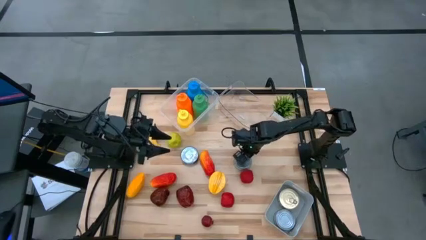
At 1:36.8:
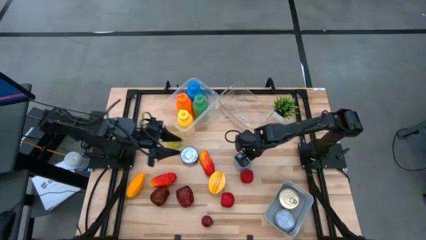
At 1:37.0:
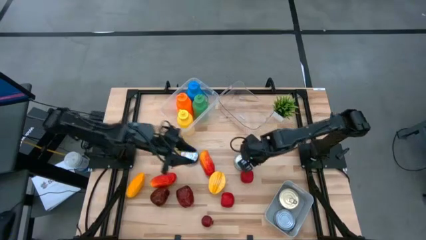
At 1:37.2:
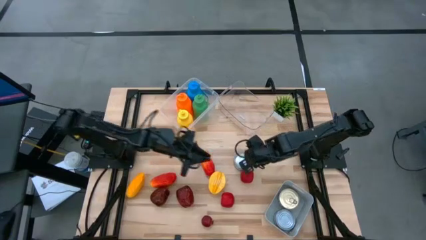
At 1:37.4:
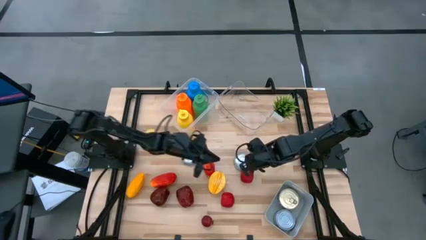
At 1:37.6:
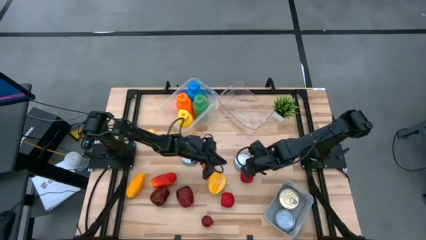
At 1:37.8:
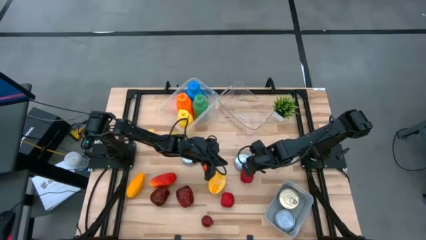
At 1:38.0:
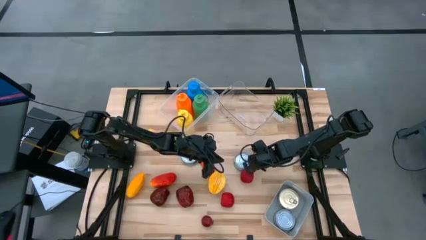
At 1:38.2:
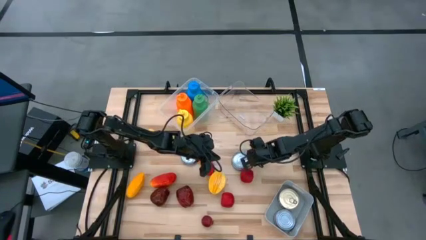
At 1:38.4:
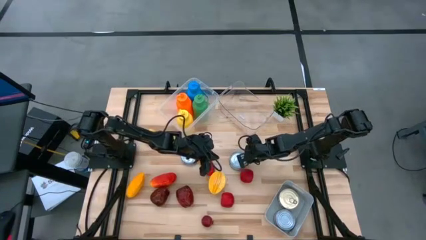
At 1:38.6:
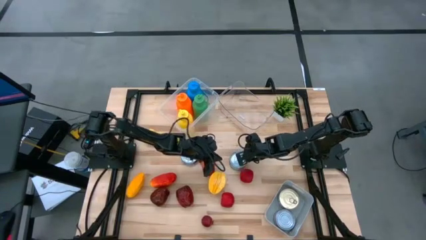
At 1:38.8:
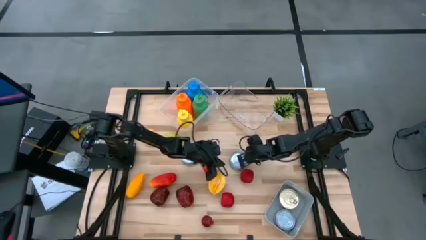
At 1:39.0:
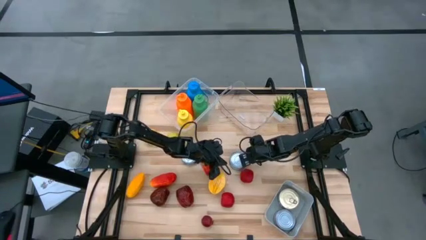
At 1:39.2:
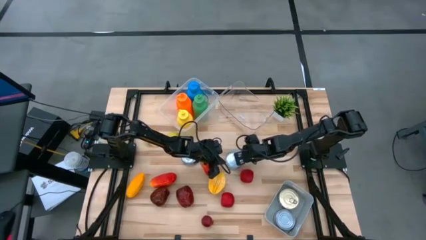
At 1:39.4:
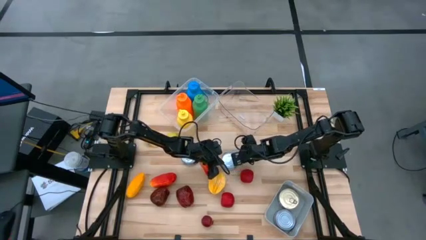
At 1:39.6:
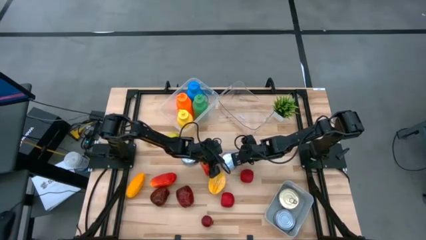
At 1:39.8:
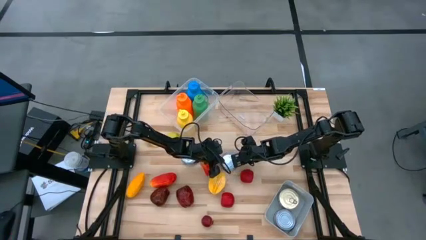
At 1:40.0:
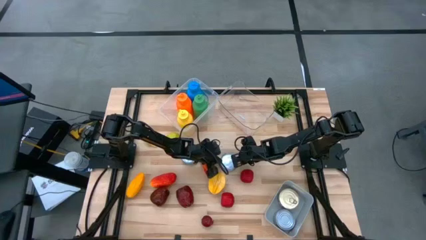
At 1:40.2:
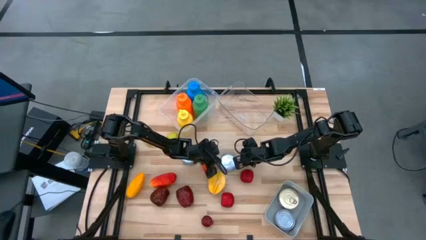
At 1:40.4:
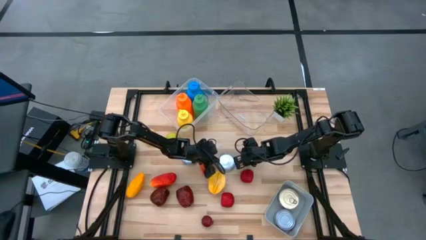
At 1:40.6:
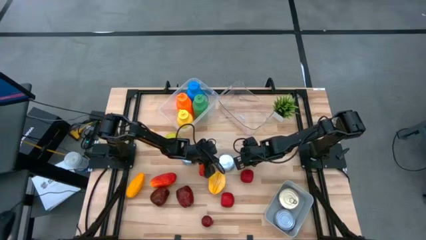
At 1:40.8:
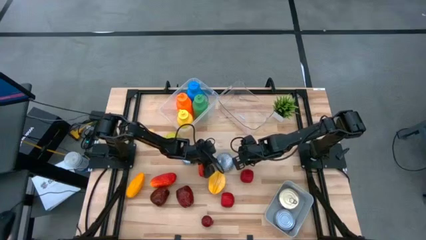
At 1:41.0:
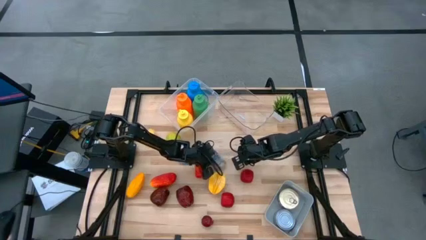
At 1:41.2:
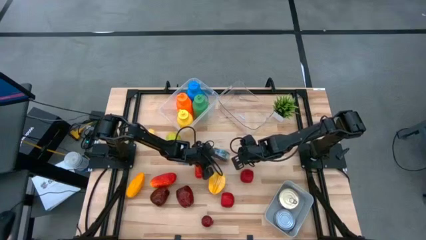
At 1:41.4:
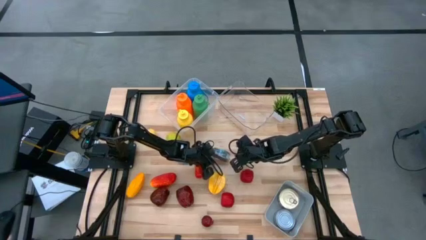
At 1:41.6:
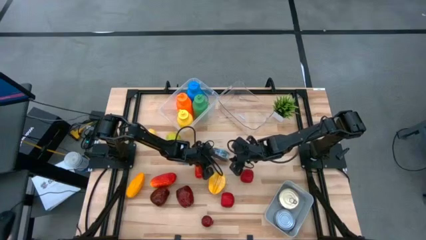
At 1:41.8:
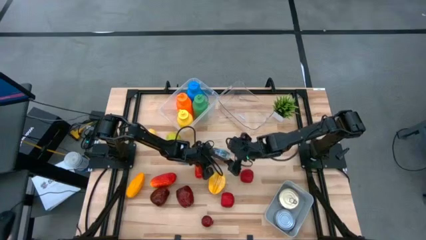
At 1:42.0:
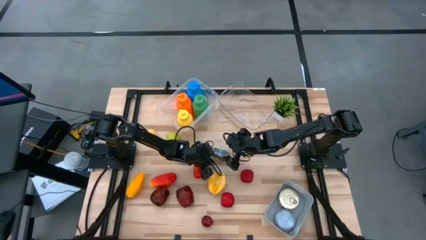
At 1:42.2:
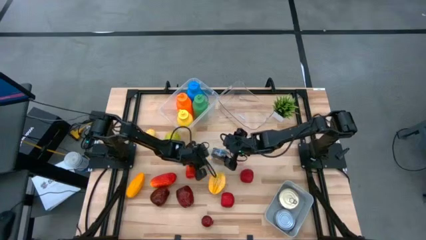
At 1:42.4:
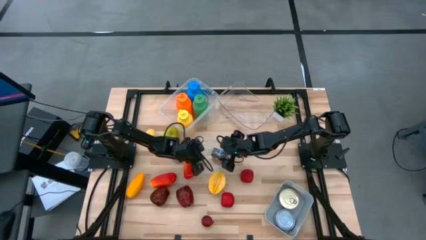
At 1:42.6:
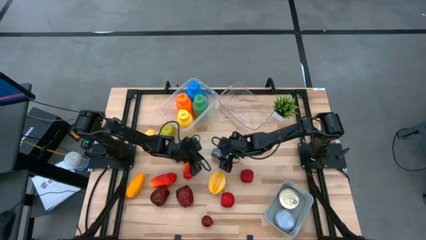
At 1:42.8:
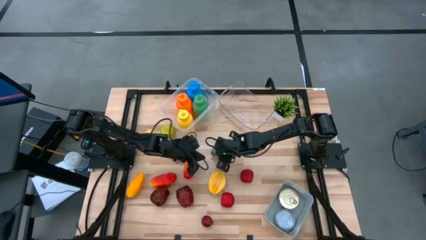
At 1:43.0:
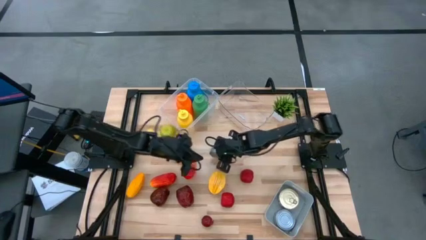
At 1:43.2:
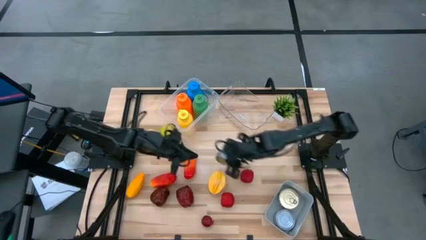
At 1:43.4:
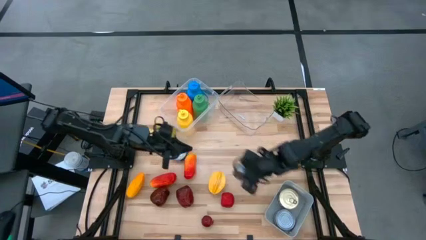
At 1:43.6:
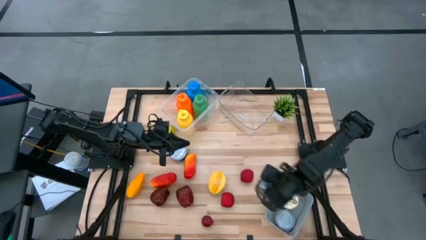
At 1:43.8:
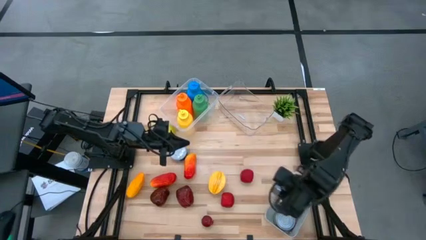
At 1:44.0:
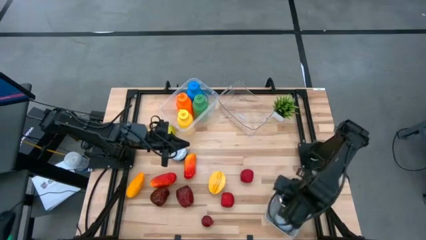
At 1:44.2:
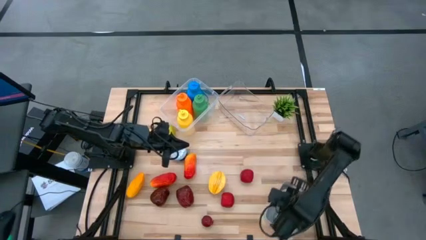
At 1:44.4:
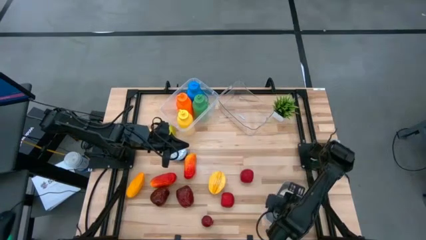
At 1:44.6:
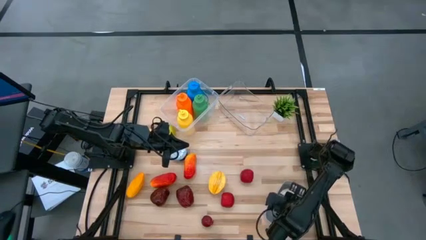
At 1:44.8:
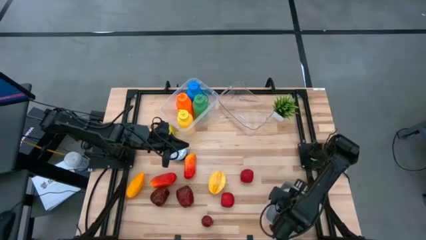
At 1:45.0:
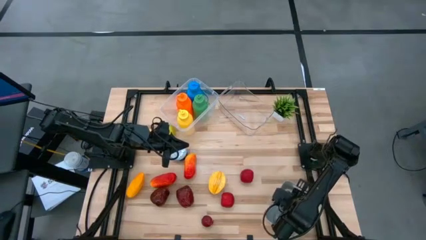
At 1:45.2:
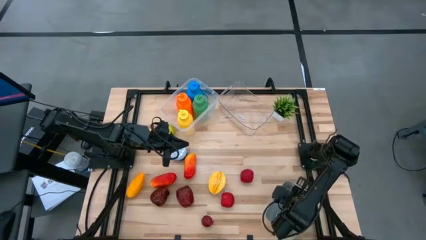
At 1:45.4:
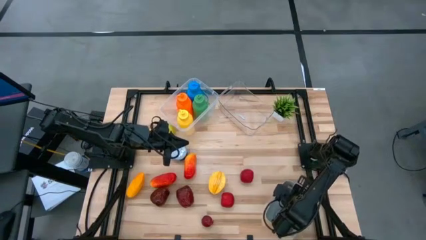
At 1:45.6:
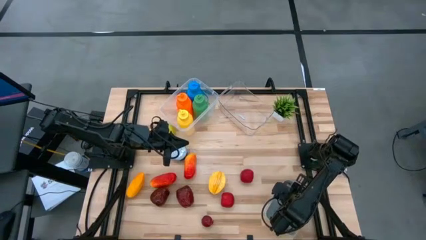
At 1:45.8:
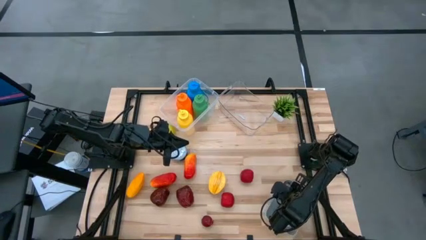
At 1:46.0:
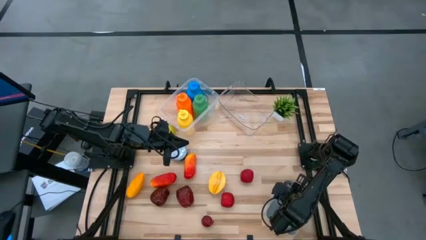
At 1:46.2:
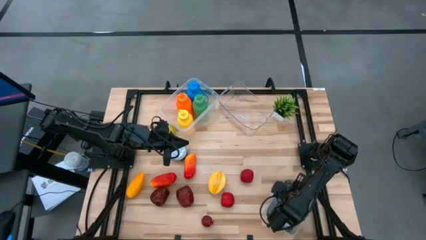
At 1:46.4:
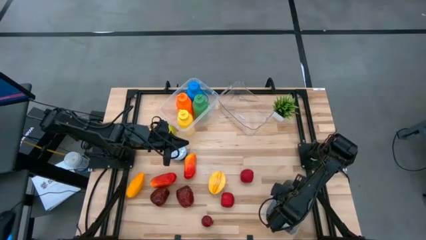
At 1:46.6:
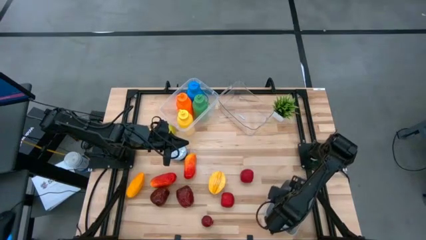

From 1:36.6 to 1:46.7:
Task: Pick & Place Food Item
Put the green tuna can into the gray bin

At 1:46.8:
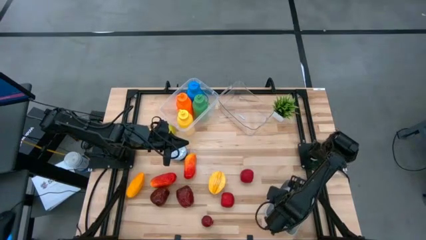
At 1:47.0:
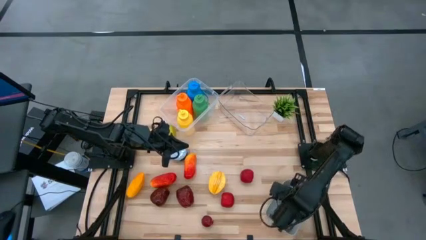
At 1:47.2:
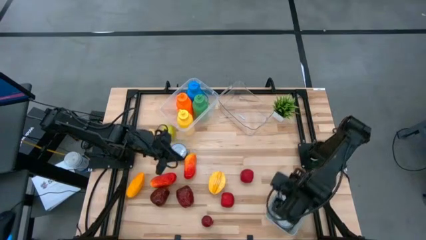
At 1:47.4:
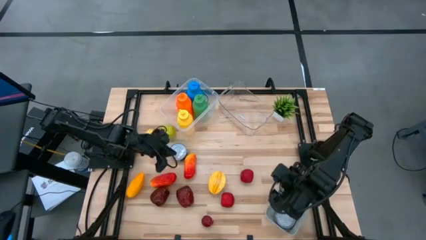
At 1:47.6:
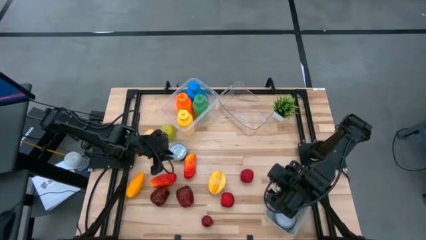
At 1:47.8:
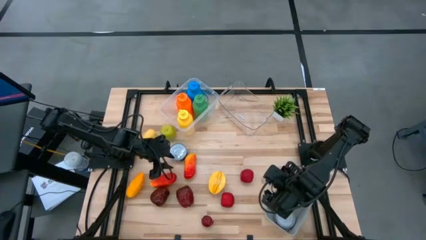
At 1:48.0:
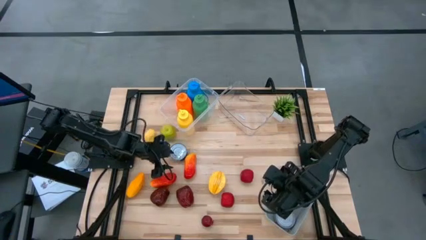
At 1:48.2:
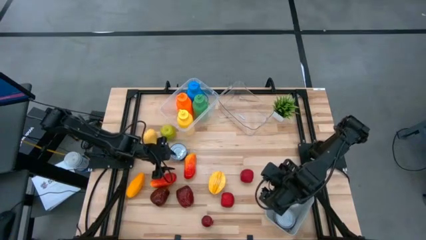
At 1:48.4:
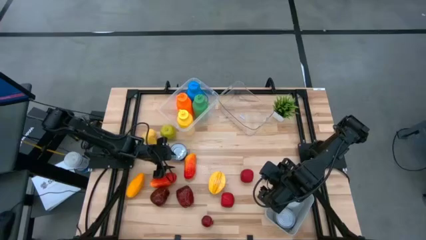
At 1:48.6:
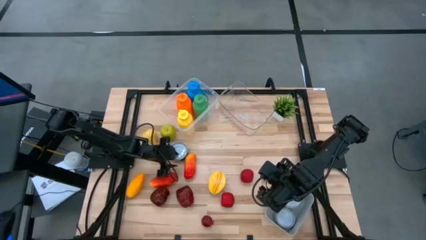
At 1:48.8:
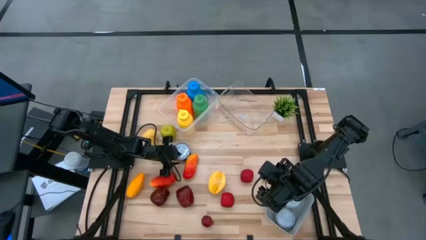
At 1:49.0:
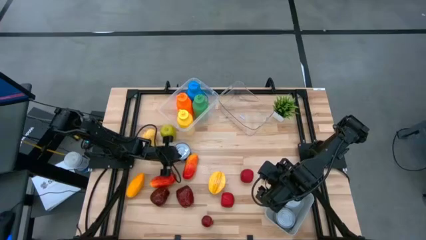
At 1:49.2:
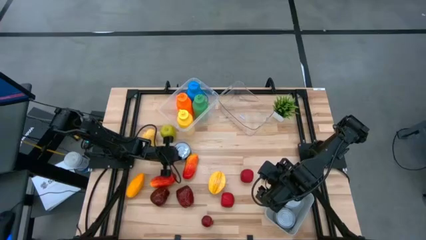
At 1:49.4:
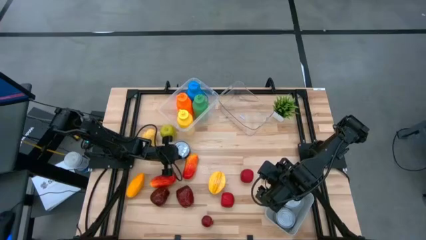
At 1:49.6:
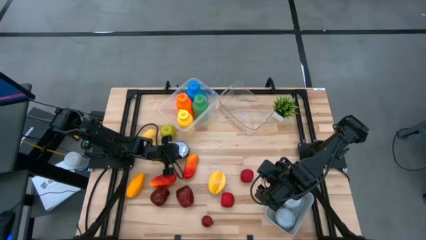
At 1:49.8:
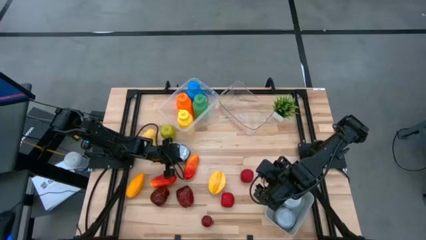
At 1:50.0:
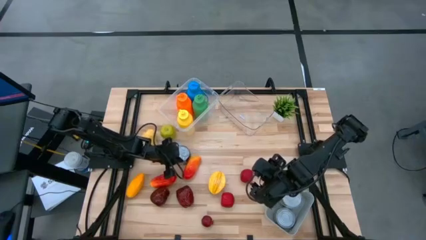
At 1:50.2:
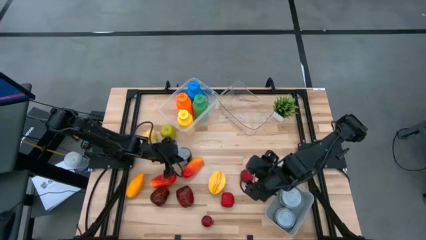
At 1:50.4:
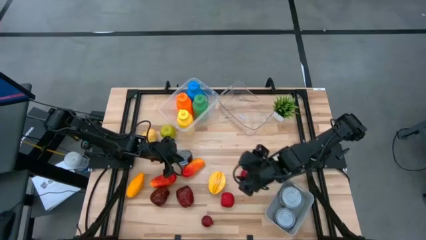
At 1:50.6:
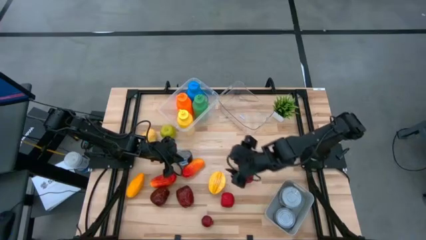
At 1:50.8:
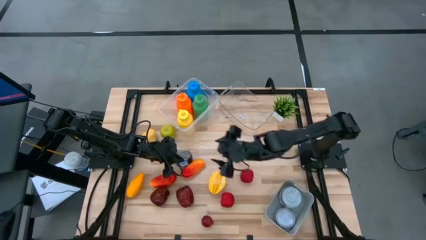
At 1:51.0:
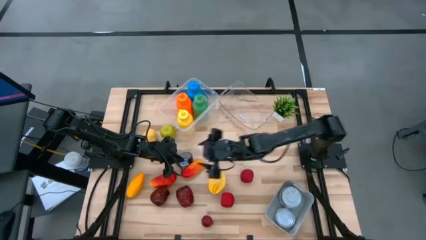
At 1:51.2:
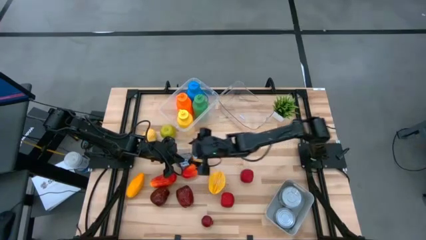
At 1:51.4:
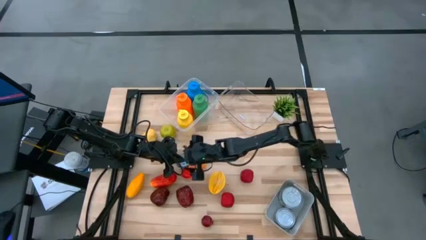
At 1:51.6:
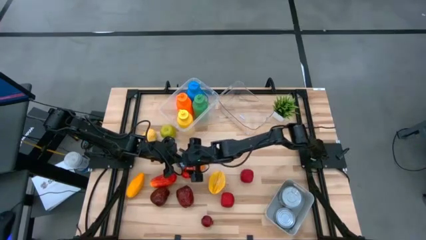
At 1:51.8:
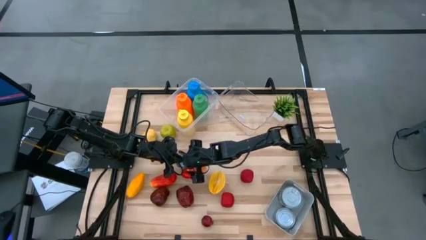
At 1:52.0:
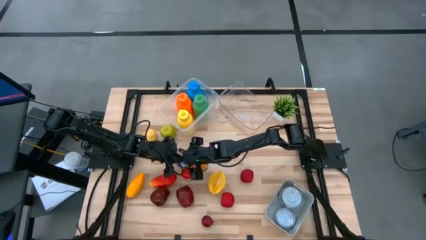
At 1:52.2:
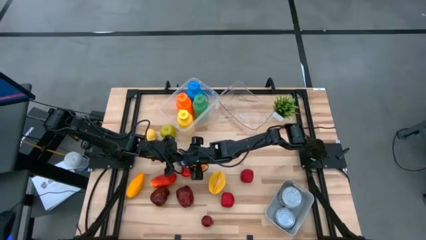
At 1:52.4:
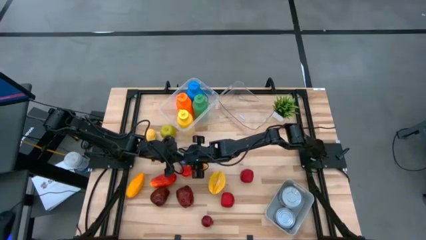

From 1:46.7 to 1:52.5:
Put the blue tuna can into the gray bin
